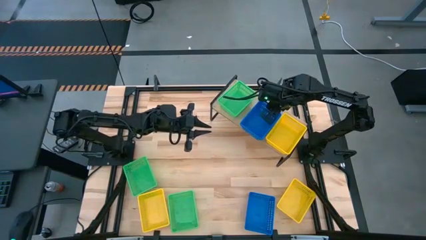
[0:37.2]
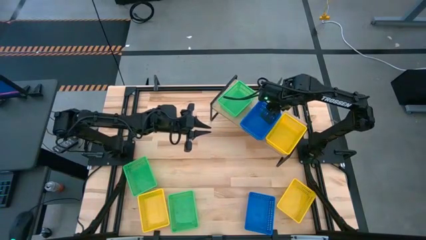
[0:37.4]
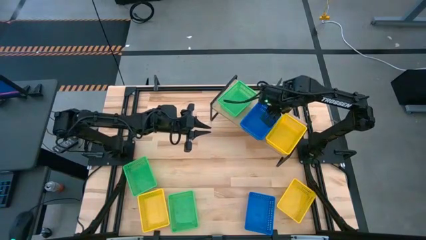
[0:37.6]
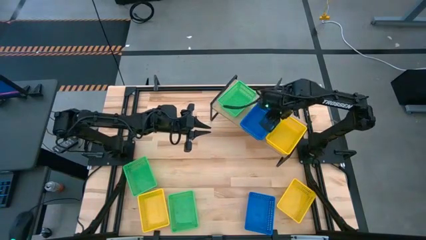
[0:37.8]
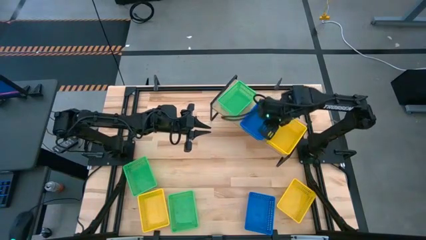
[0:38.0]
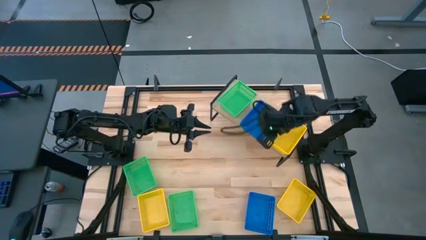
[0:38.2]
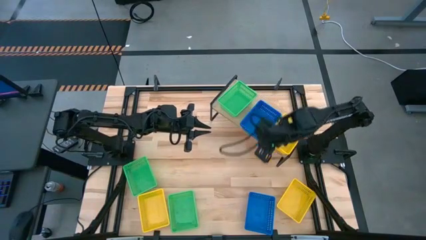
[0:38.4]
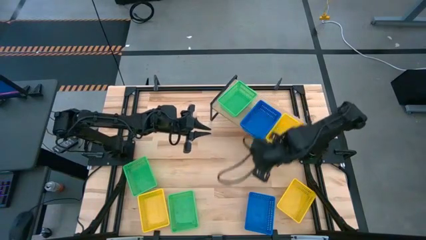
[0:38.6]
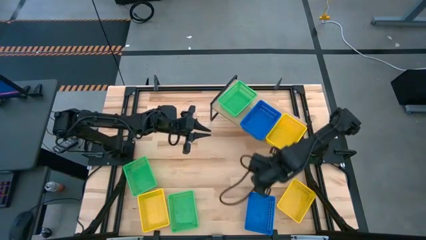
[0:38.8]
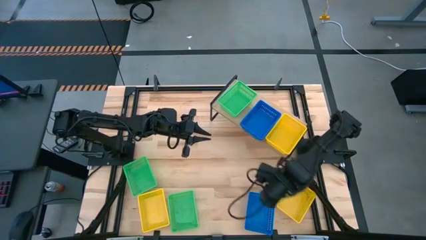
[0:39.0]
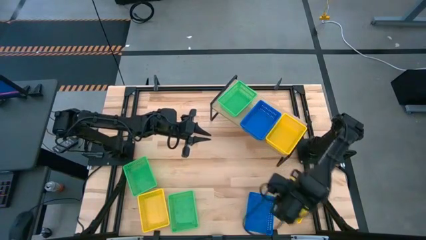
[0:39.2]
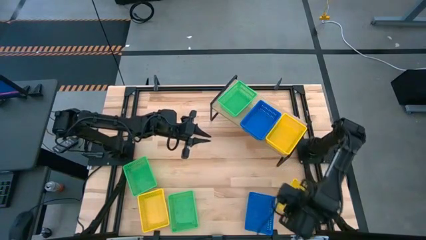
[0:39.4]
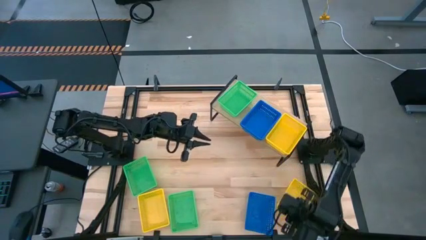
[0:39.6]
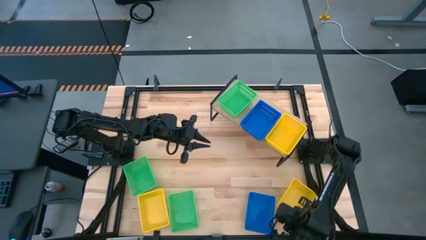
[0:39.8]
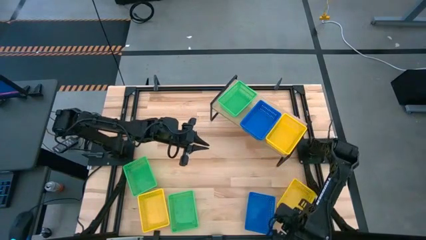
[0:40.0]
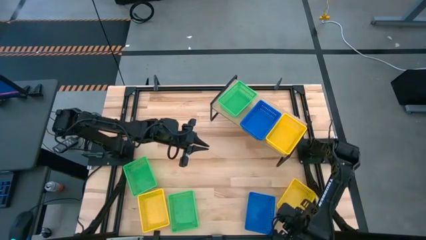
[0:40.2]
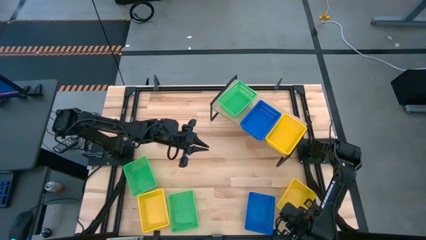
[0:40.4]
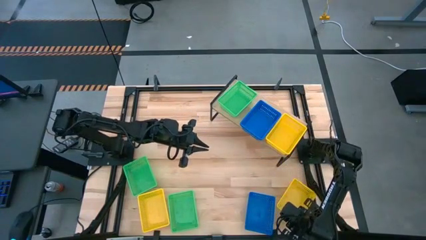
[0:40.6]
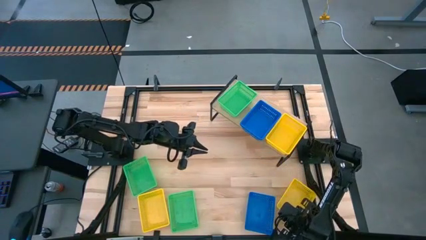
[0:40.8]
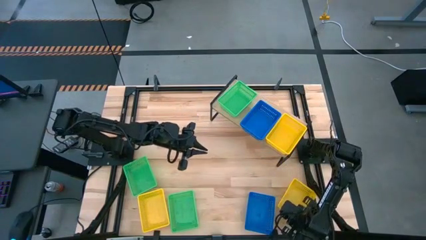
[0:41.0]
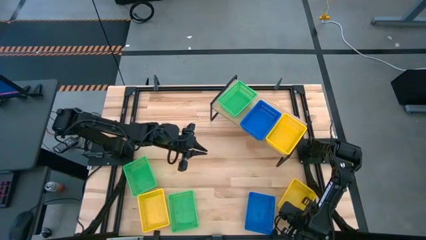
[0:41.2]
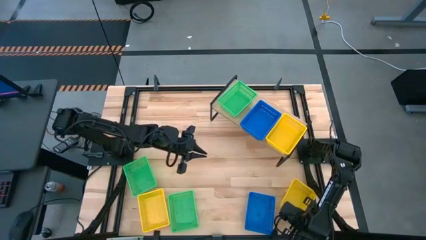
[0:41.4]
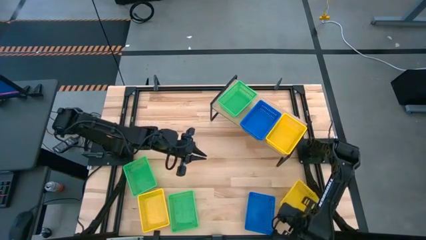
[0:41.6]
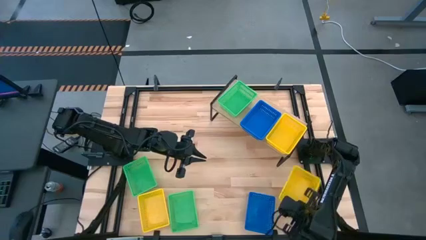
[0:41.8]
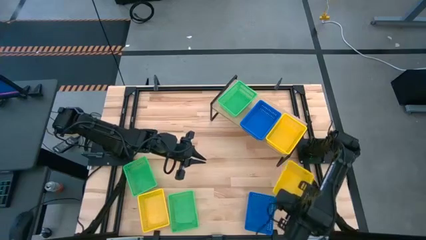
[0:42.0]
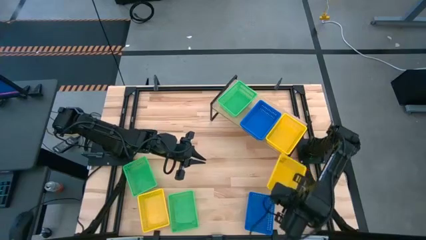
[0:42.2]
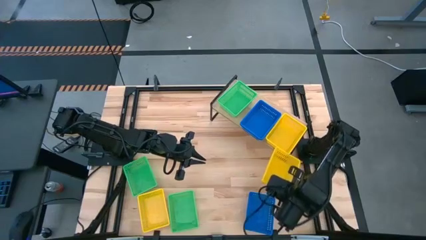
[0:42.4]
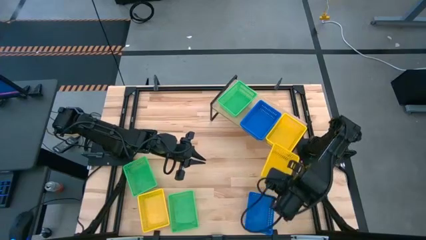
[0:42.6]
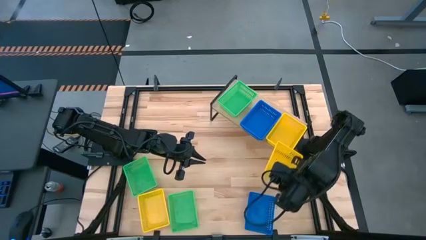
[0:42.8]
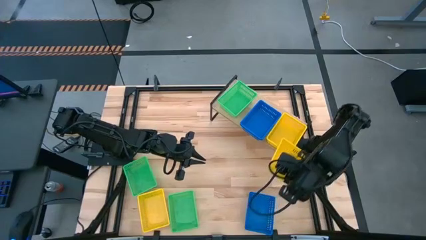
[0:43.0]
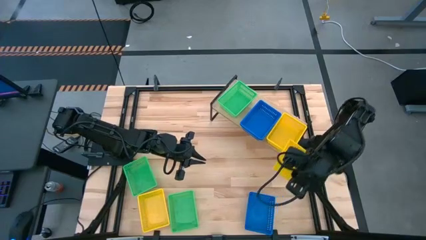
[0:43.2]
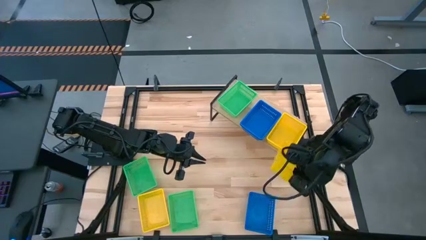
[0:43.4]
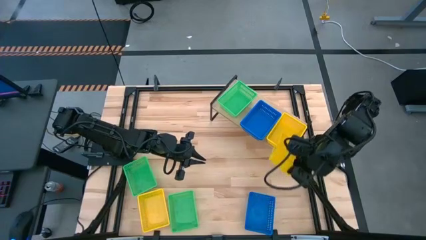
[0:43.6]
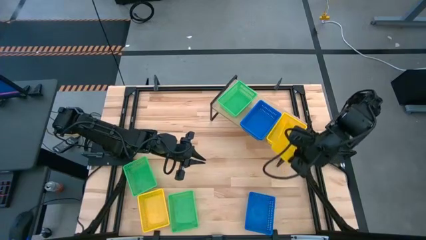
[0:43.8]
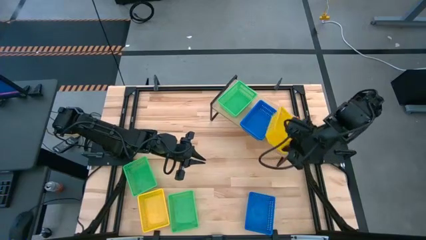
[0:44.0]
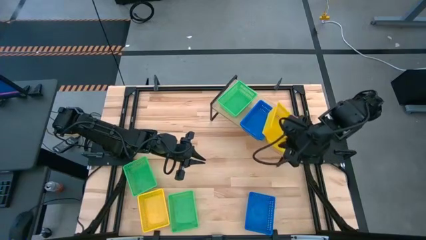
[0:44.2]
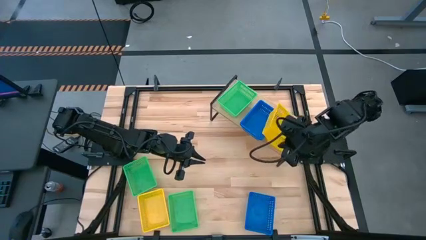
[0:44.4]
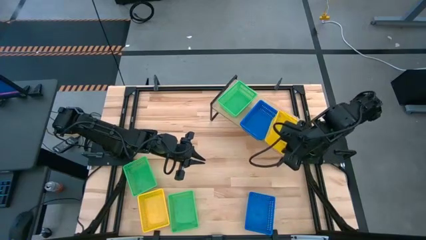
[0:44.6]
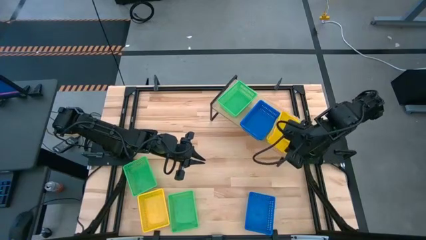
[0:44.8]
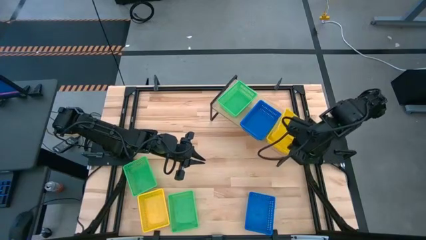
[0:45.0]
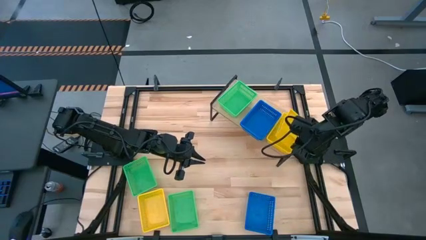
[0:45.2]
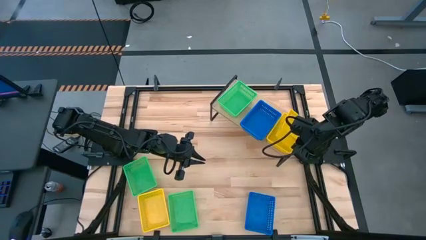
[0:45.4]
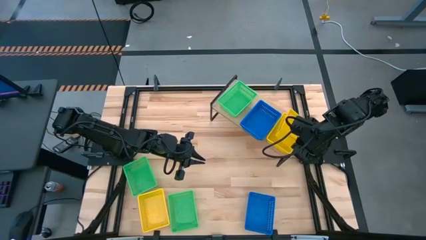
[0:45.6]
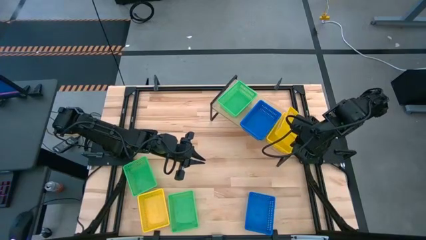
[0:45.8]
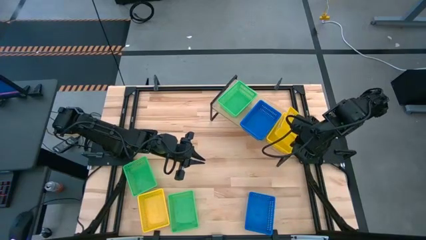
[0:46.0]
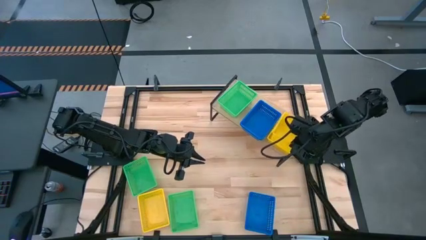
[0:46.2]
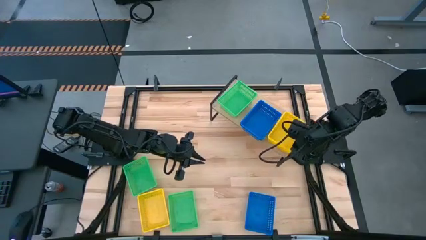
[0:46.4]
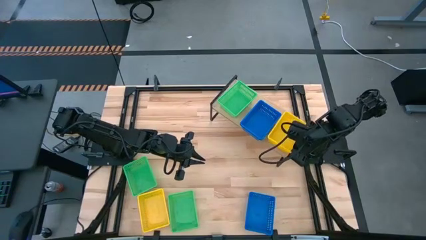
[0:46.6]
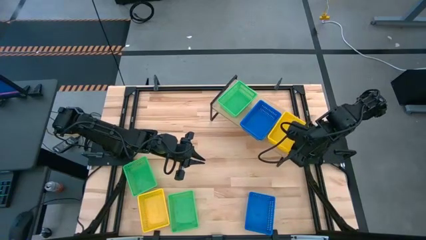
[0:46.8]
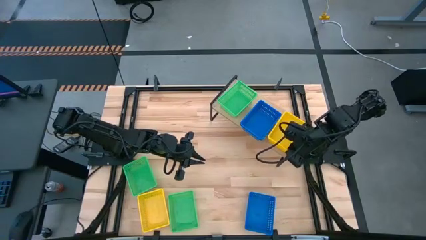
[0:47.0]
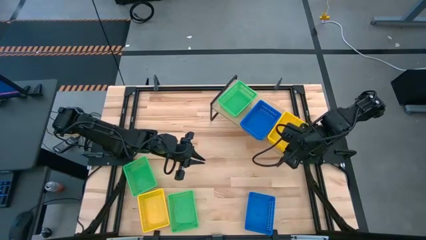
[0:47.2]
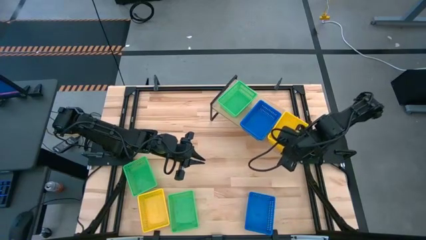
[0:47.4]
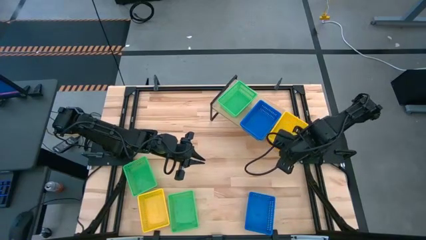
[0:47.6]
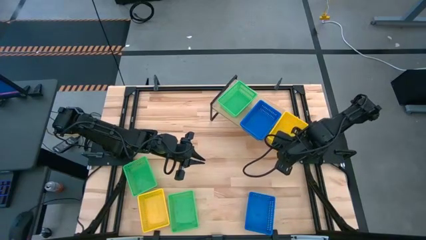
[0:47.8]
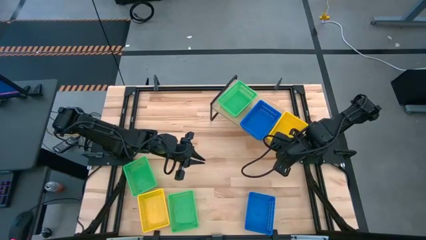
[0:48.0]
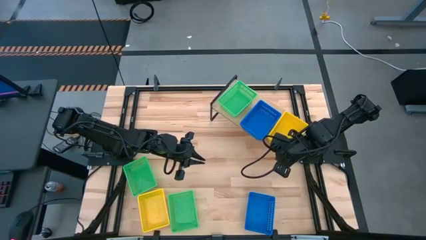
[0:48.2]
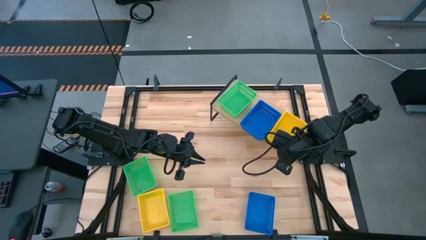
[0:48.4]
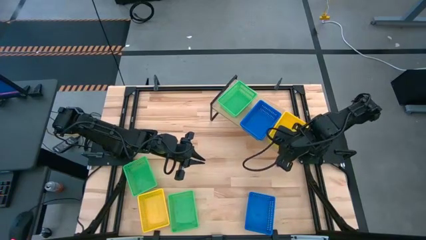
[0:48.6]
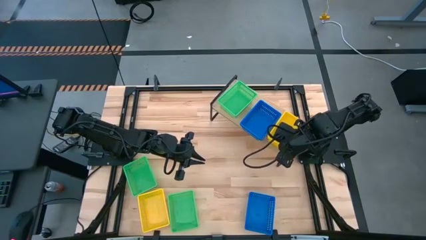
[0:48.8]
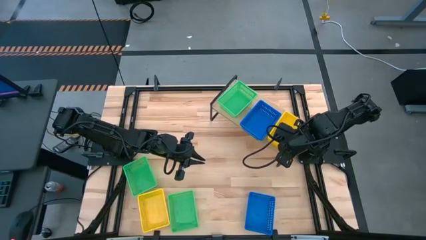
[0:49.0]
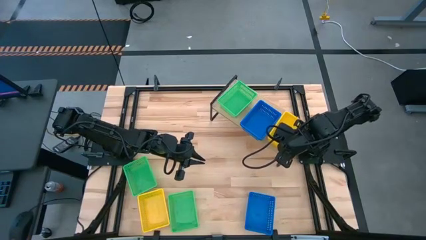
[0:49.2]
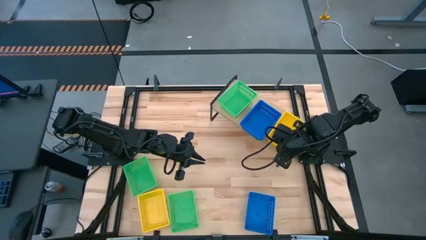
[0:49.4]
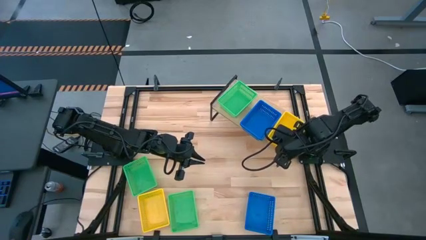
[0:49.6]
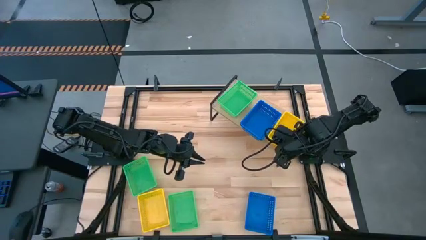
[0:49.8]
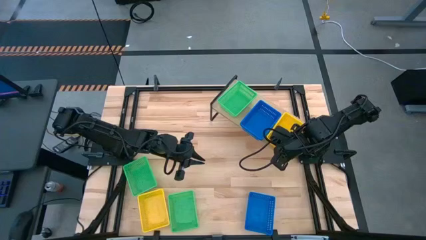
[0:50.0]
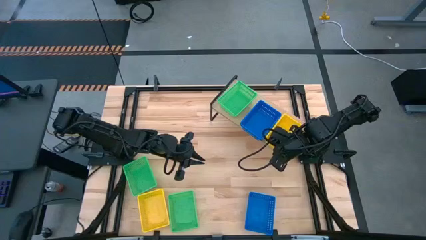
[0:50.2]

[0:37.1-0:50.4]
Task: Stack baskets on shelf by color
Stack the right yellow bin on top of the yellow bin on the shelf

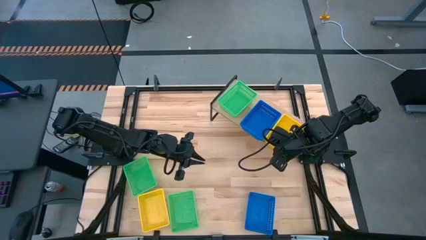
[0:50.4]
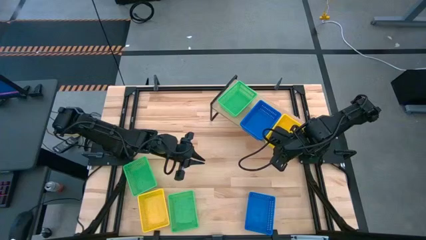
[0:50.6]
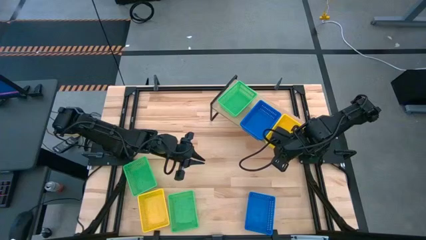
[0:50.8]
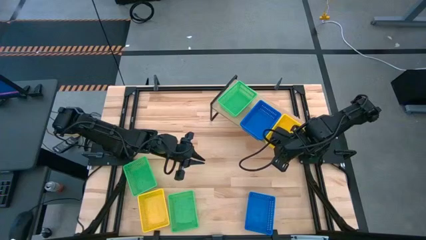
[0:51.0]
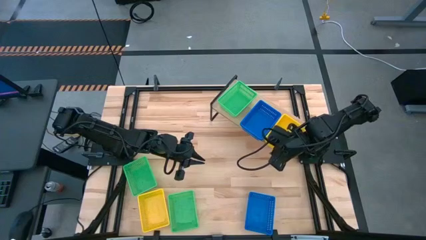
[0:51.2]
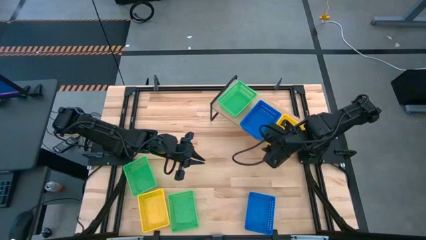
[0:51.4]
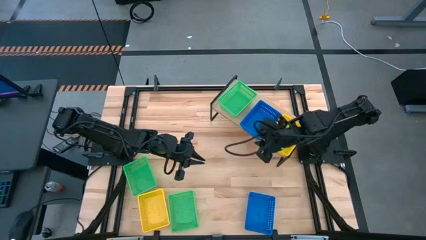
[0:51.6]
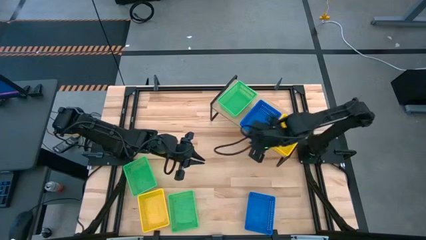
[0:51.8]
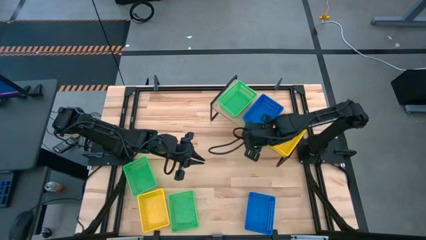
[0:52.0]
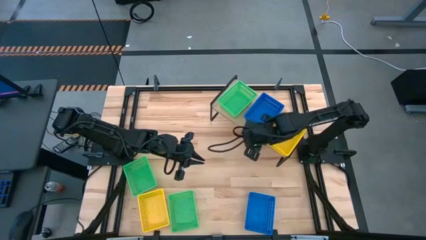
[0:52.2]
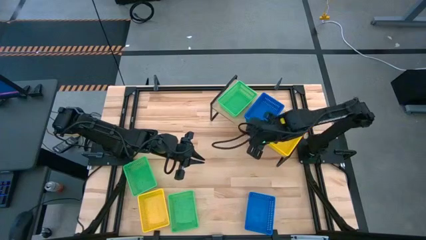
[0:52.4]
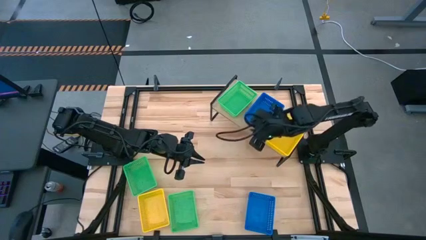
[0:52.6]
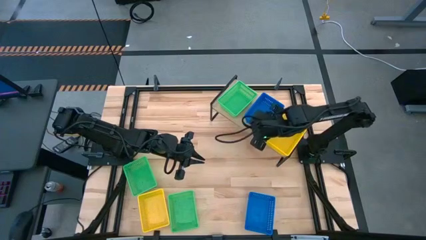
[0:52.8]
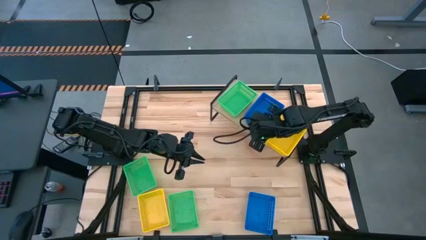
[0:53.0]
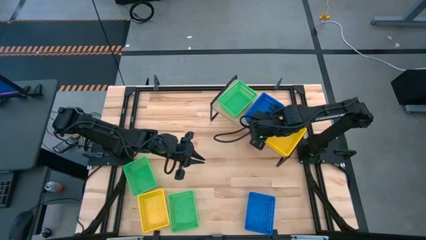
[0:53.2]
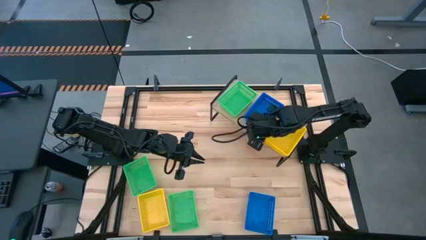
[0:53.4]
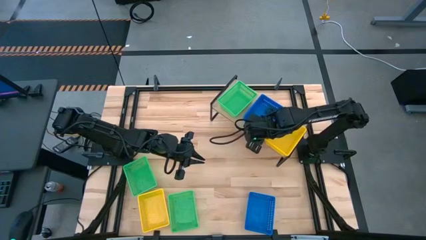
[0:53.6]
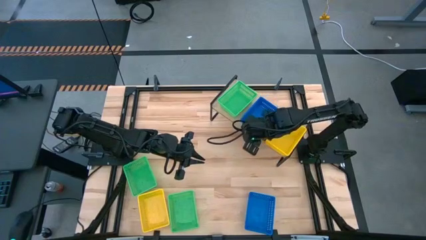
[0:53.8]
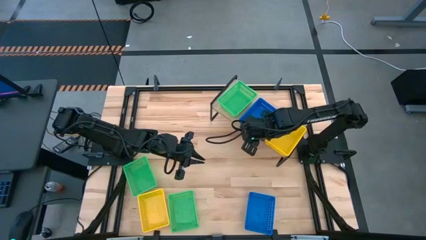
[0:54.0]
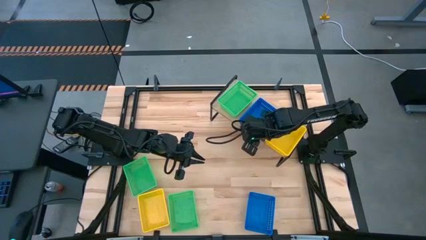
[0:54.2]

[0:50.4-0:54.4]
Adjust the blue bin on the shelf
